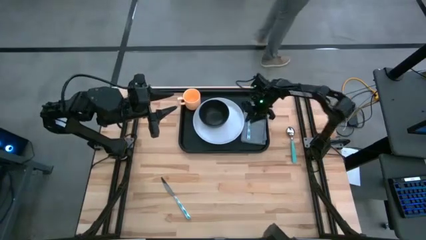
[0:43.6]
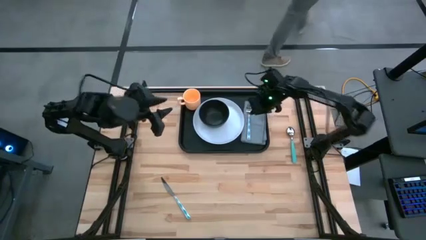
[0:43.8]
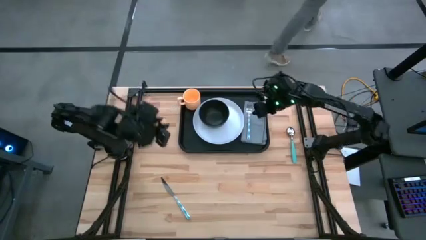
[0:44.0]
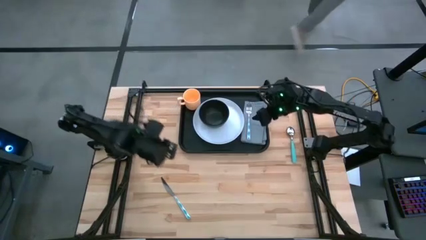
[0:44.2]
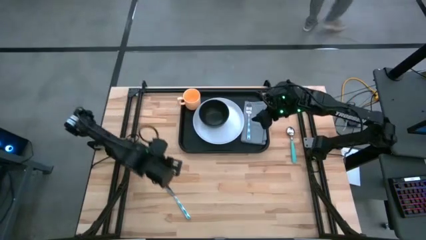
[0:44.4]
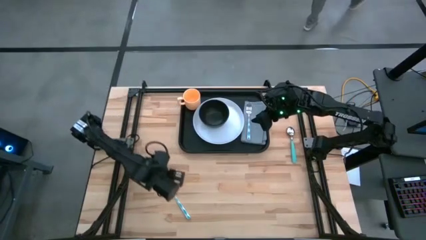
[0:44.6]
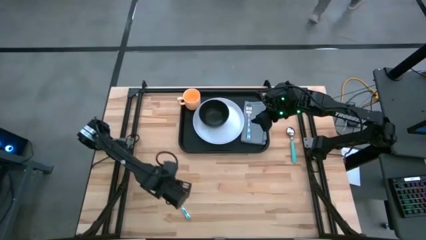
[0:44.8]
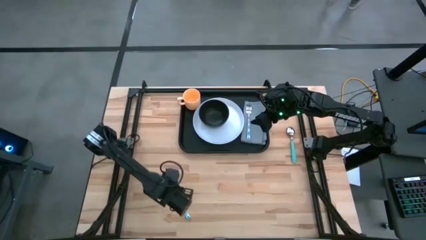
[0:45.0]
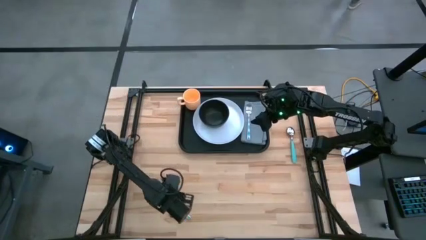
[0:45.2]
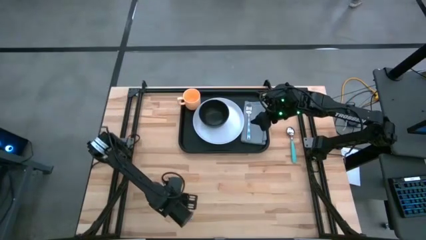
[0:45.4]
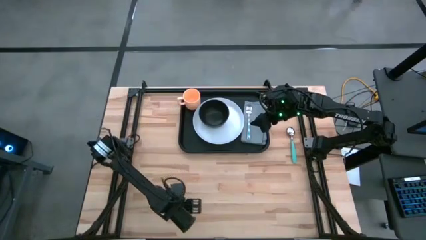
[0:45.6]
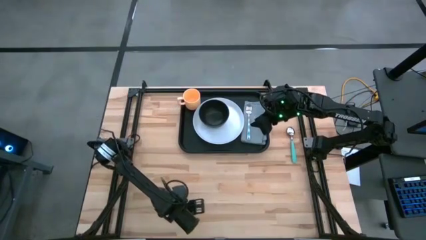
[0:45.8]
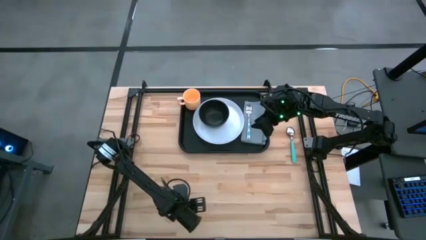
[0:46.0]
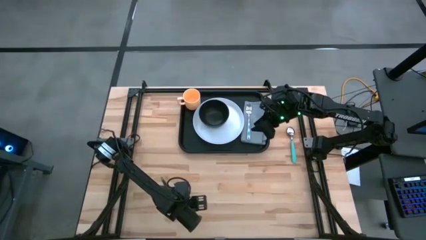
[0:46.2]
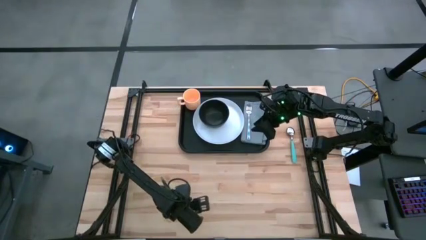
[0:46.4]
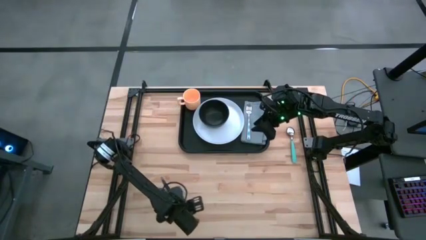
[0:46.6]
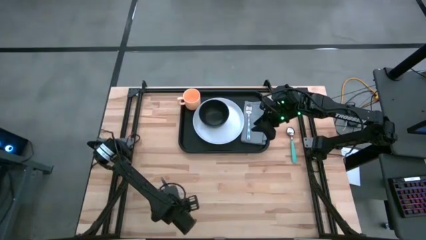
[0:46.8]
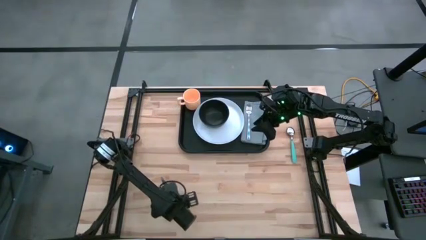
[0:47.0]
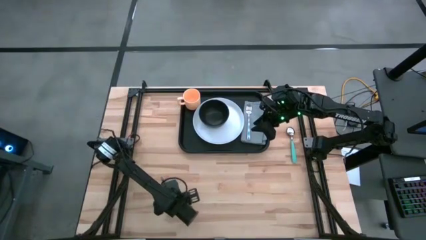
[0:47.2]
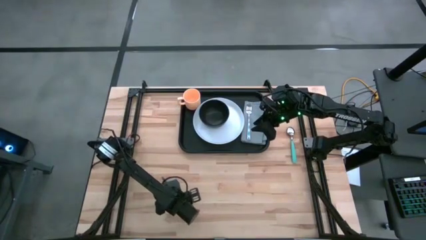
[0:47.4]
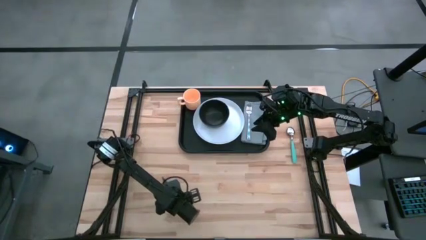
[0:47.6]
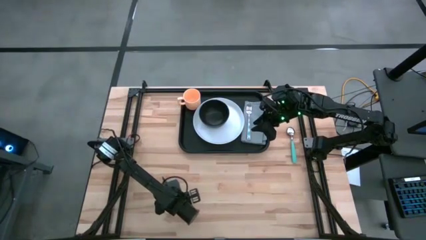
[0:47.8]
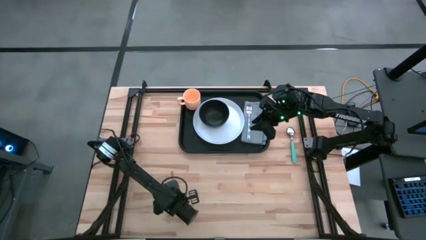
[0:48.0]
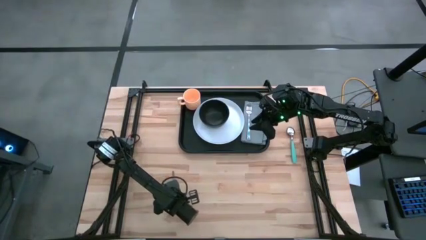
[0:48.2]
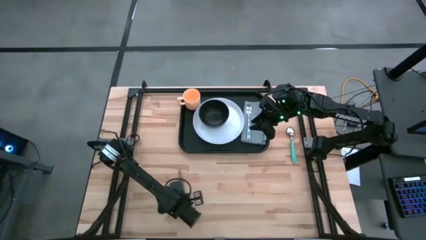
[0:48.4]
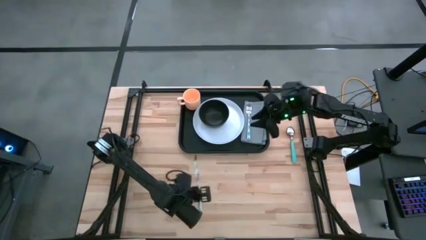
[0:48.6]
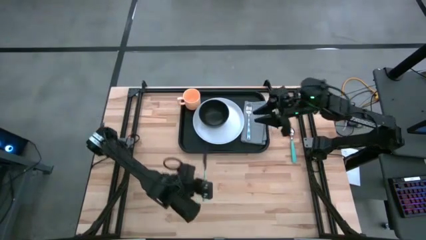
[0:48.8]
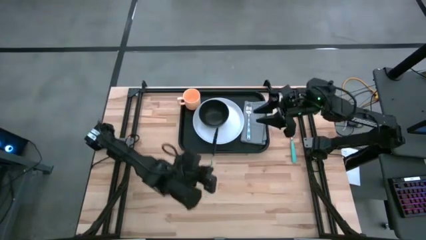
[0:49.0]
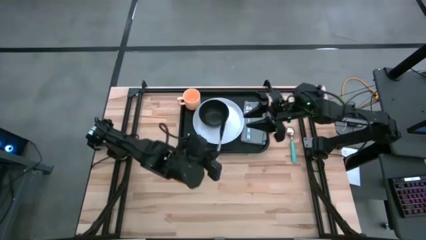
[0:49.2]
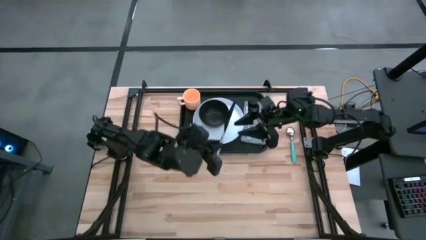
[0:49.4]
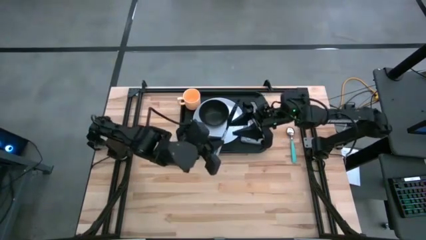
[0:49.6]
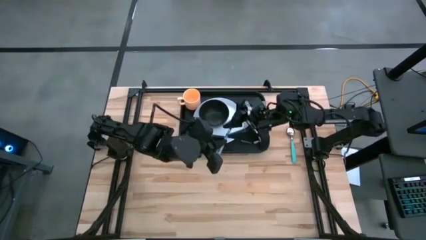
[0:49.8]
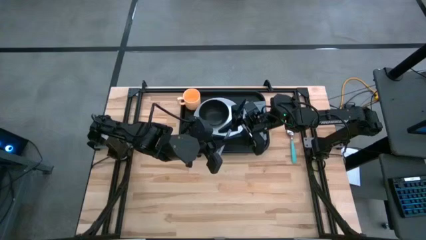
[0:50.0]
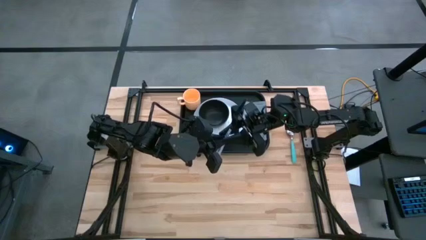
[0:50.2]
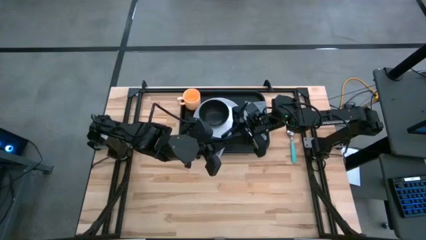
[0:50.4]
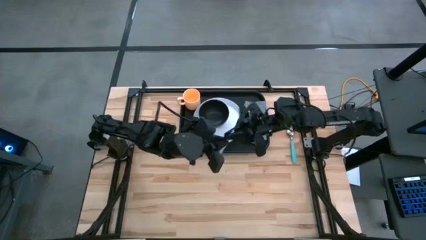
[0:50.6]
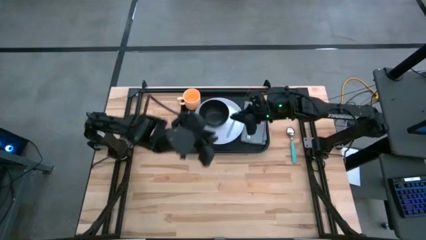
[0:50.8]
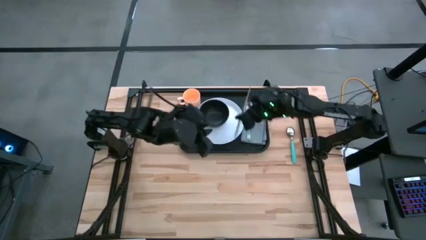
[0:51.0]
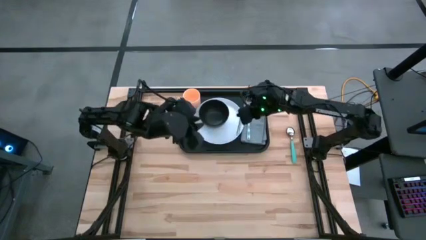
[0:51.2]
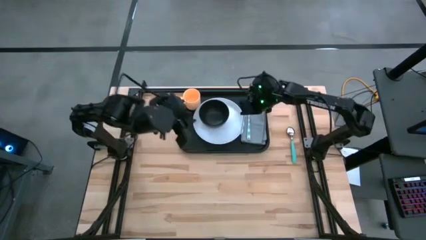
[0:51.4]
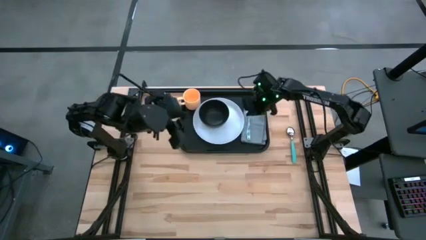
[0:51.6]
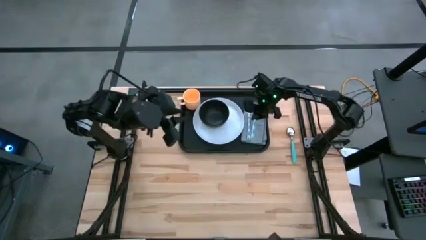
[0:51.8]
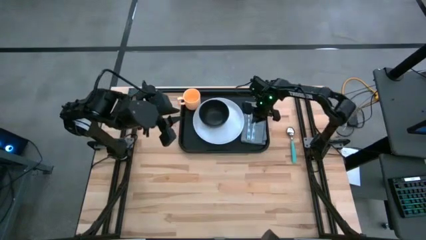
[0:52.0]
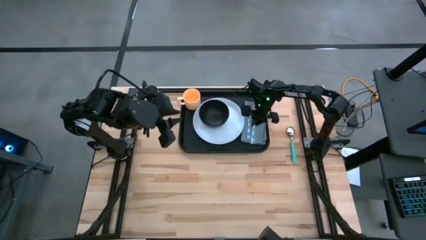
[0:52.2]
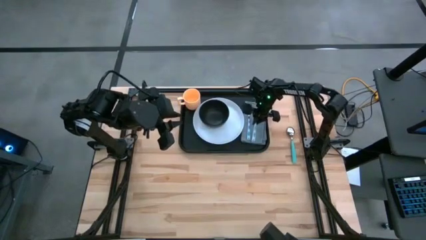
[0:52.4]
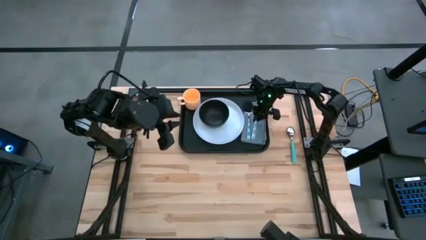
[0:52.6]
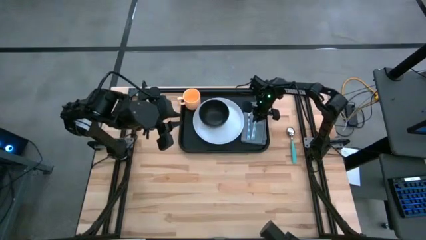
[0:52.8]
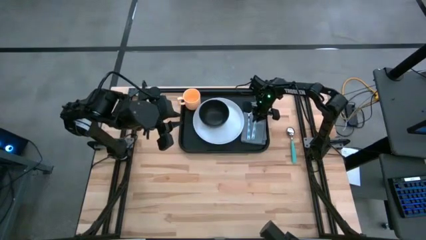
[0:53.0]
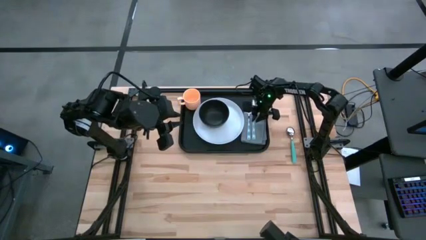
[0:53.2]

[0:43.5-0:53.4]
Task: Set up tray
Put the blue knife on top of the gray napkin on the black tray

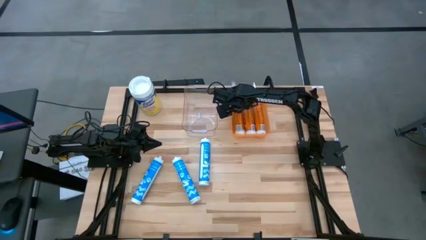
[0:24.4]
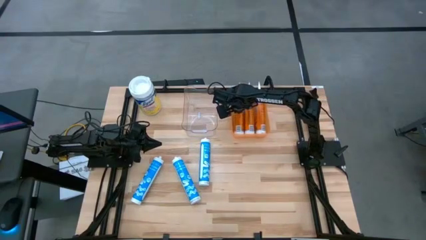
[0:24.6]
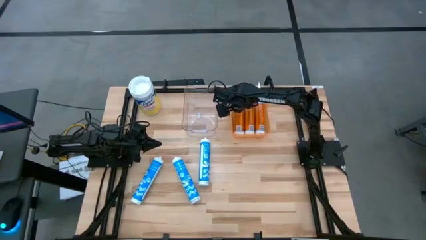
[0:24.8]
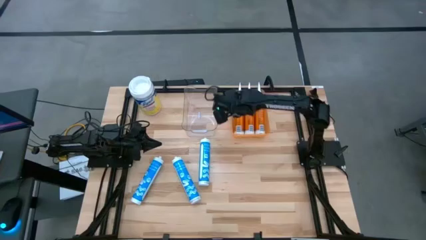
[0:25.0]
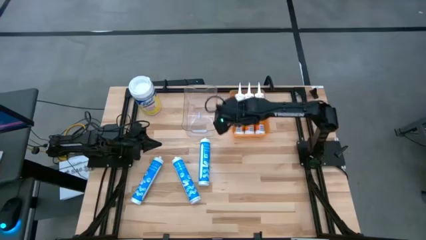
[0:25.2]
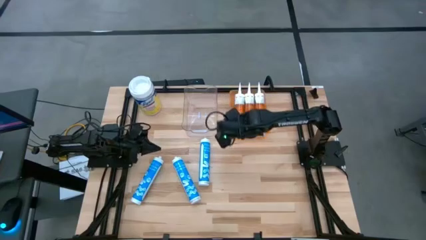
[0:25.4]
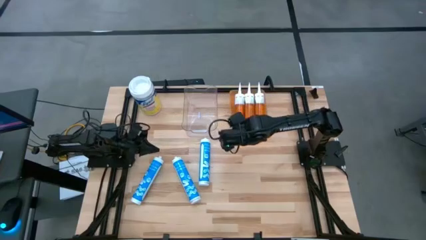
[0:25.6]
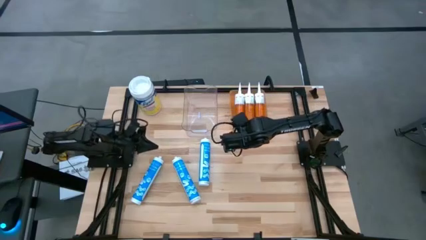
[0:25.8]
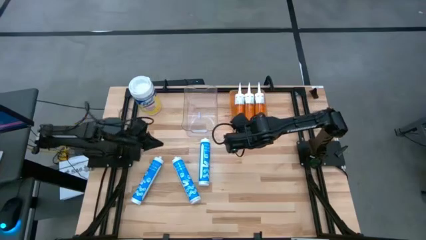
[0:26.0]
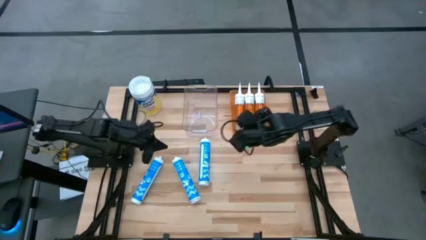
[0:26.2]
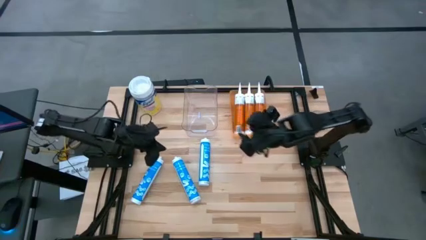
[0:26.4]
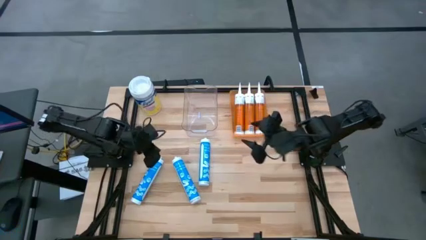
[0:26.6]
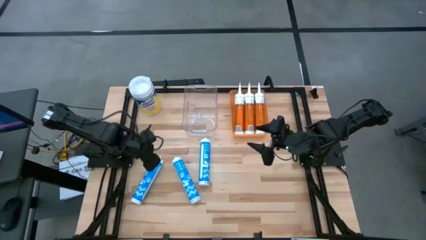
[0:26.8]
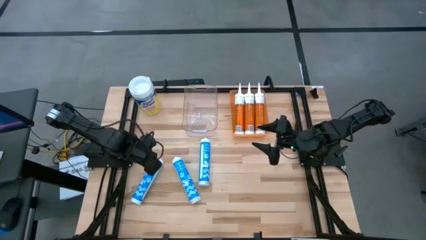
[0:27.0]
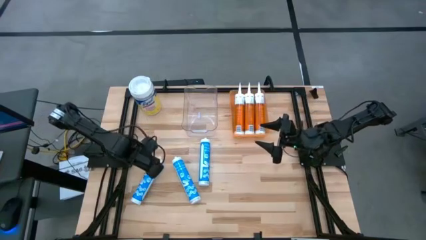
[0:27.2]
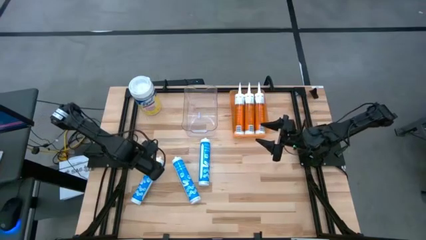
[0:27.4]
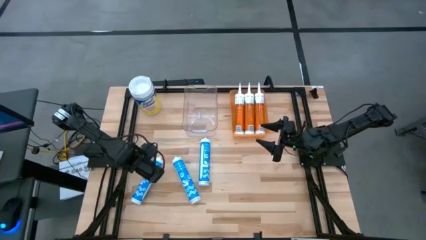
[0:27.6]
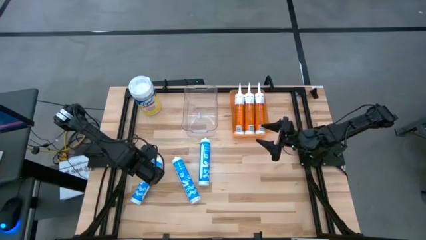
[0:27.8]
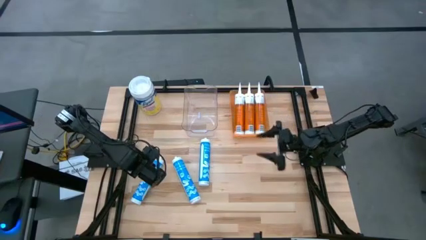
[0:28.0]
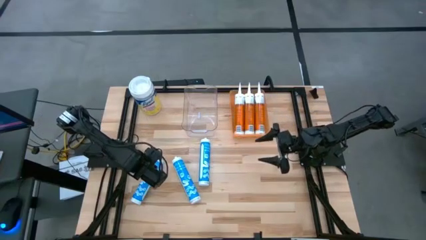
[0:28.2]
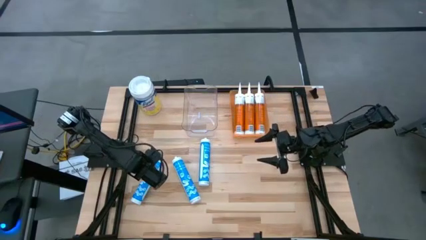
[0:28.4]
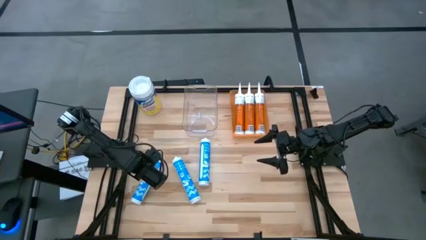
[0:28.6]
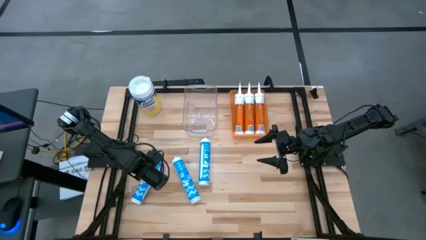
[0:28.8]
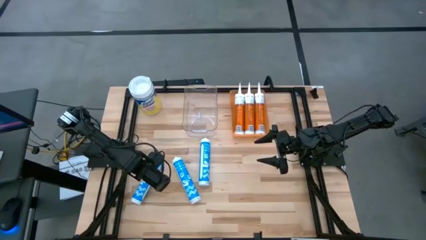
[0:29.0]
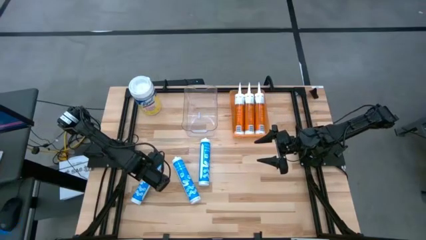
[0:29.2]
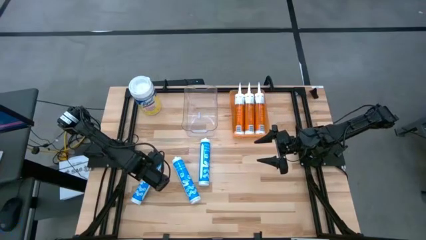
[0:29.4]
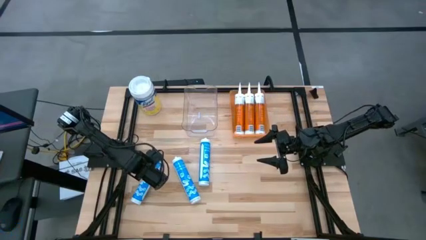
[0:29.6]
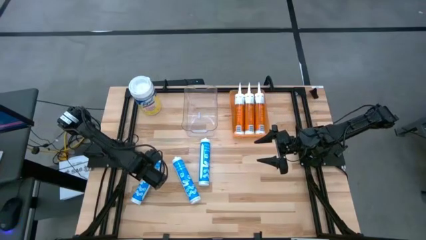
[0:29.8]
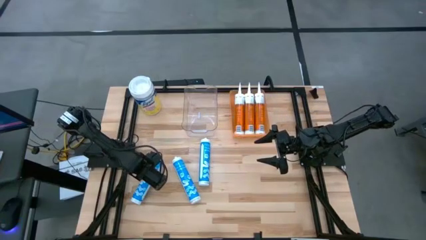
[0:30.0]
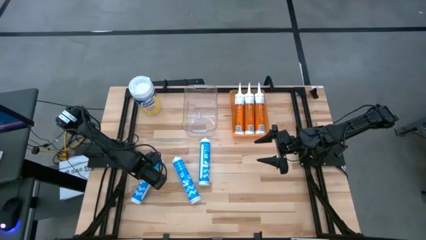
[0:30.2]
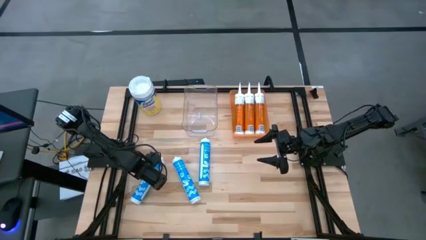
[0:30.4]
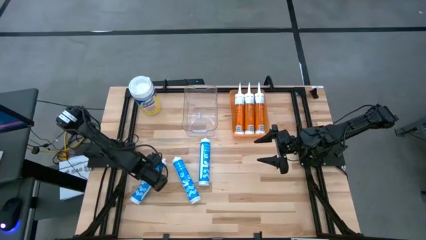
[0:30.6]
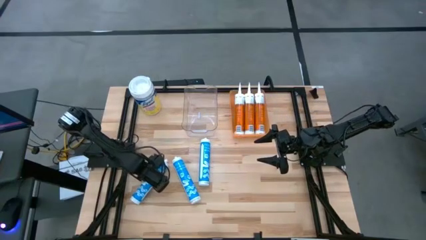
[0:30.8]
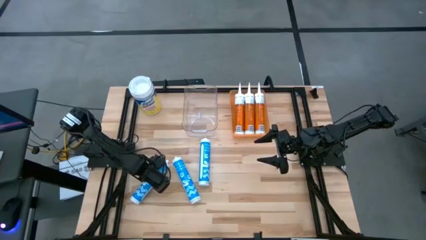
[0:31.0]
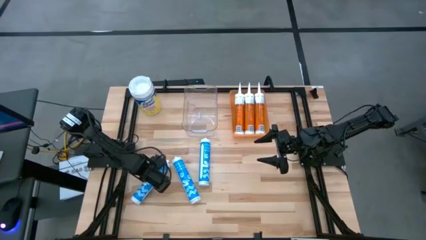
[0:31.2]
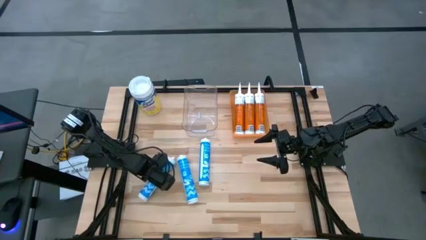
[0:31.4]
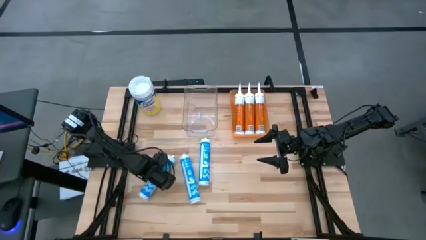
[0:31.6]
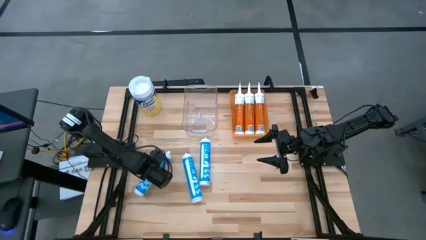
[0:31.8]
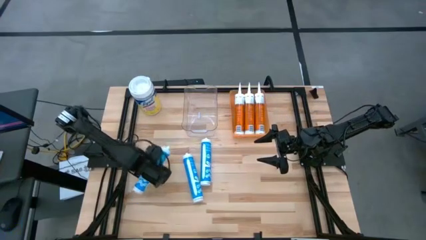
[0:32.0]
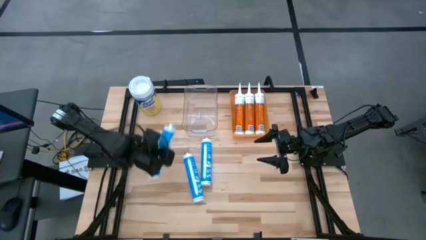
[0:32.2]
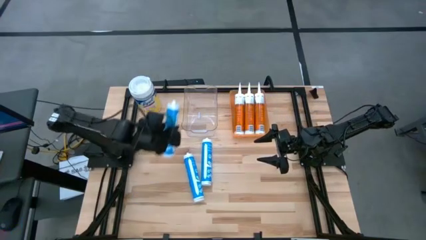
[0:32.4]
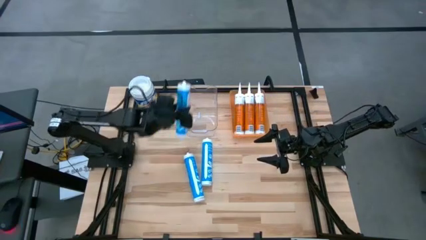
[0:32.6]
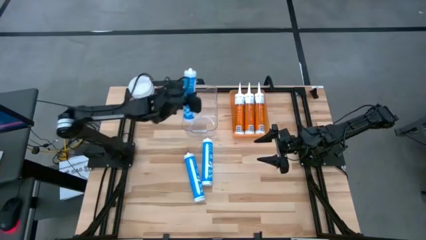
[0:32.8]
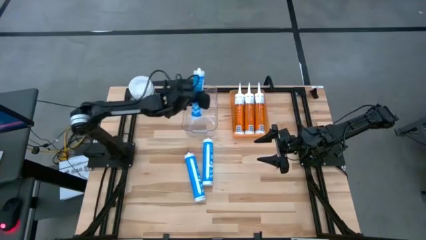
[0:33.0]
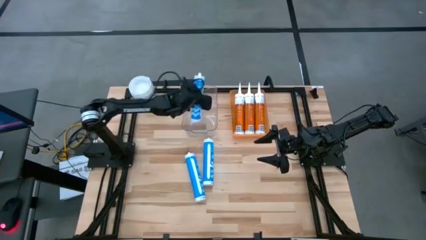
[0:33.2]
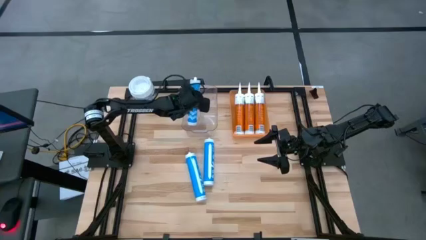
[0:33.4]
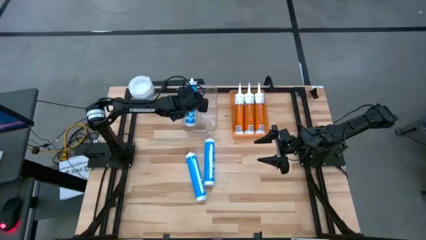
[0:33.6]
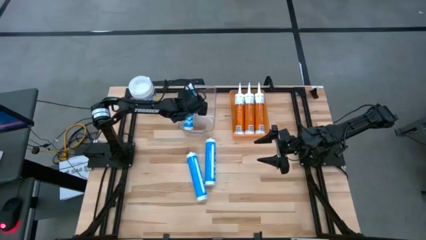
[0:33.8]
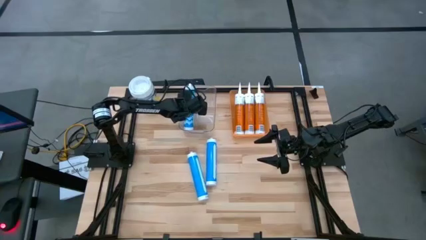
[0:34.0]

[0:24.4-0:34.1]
Task: Pick & place silicon tubes, Sealant and Lysol wipes
Put the left blue sealant into the transparent bin
